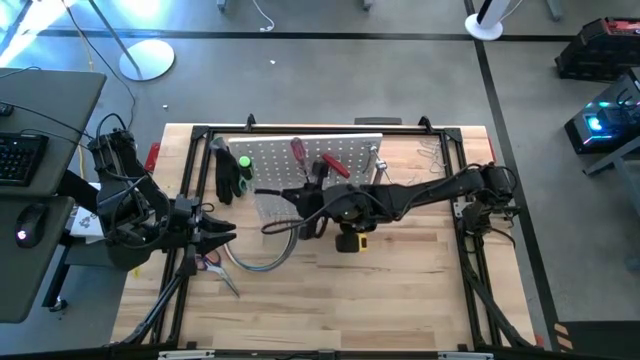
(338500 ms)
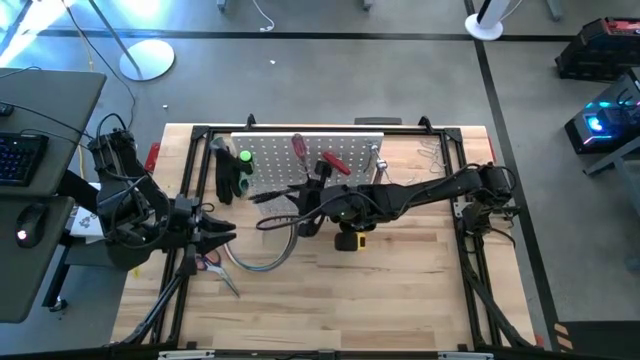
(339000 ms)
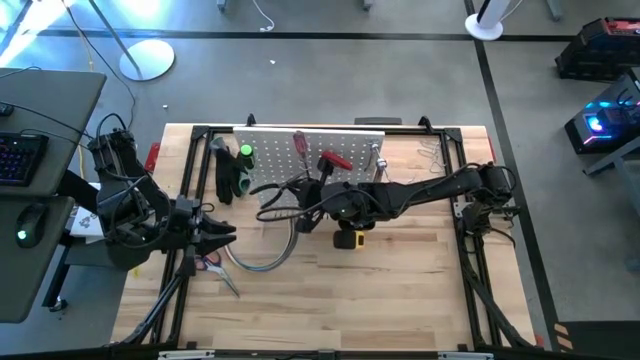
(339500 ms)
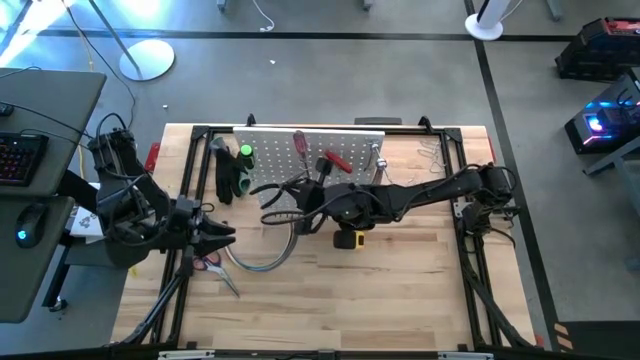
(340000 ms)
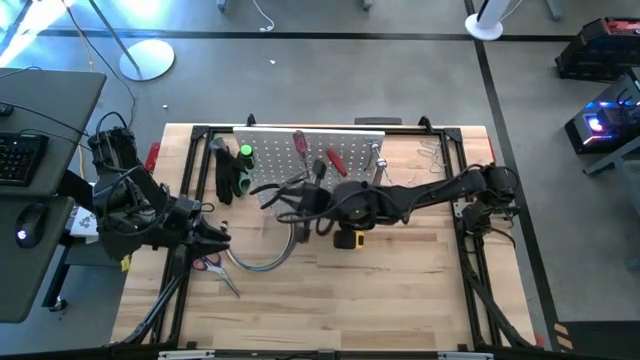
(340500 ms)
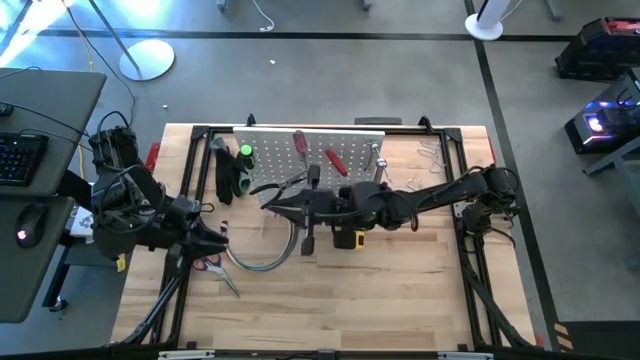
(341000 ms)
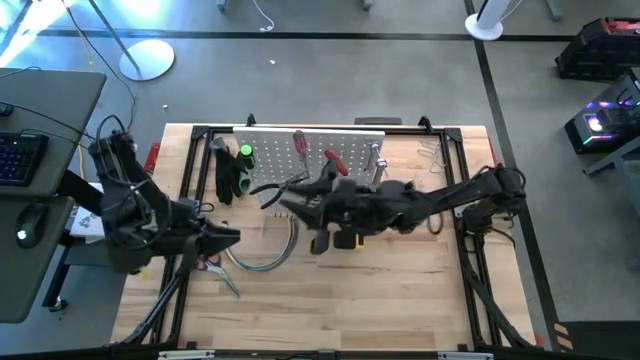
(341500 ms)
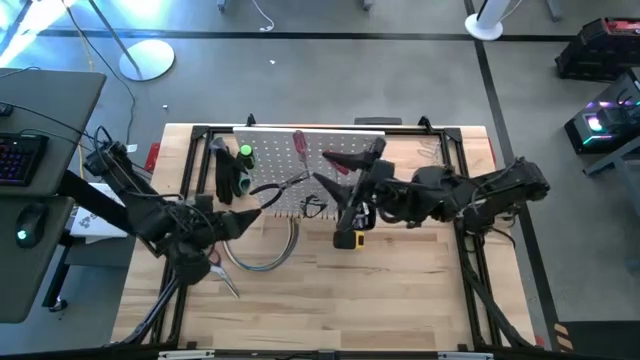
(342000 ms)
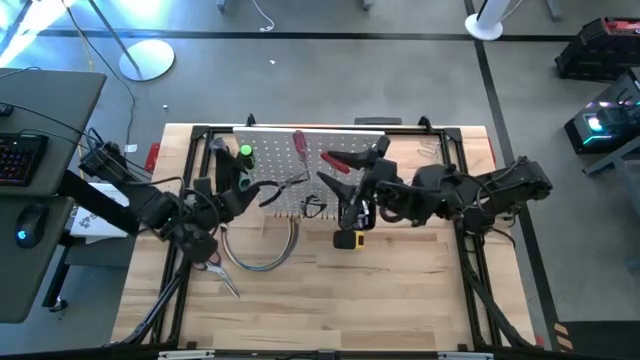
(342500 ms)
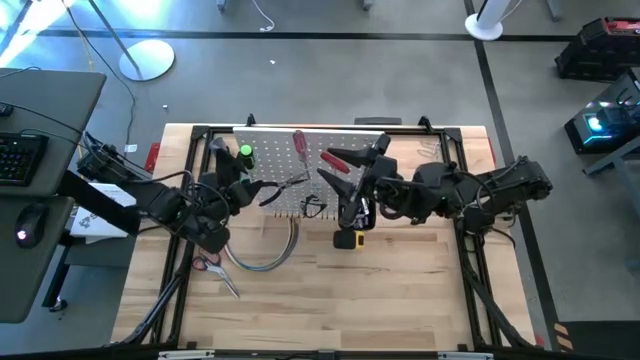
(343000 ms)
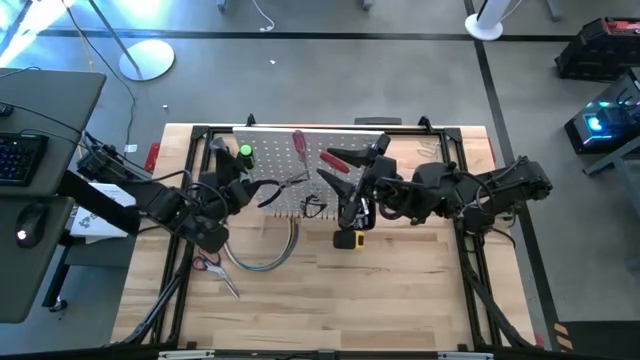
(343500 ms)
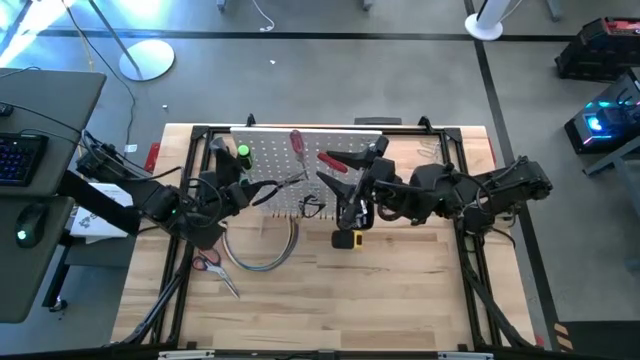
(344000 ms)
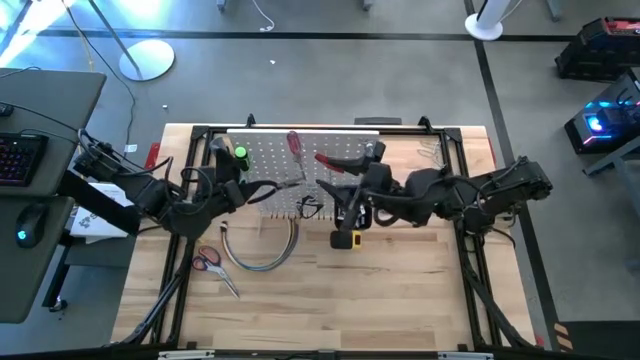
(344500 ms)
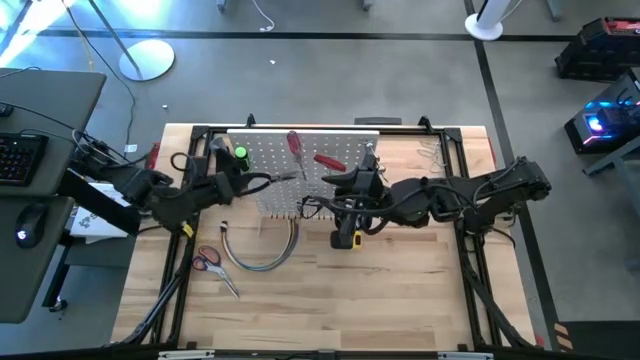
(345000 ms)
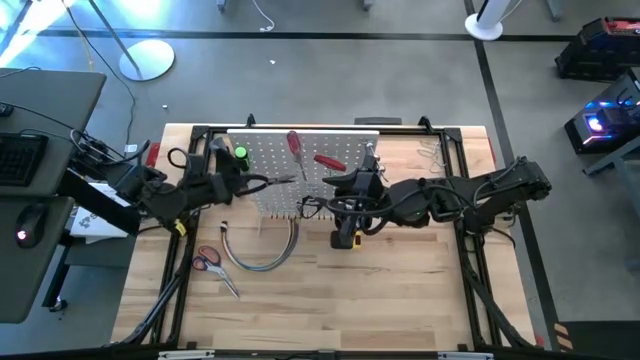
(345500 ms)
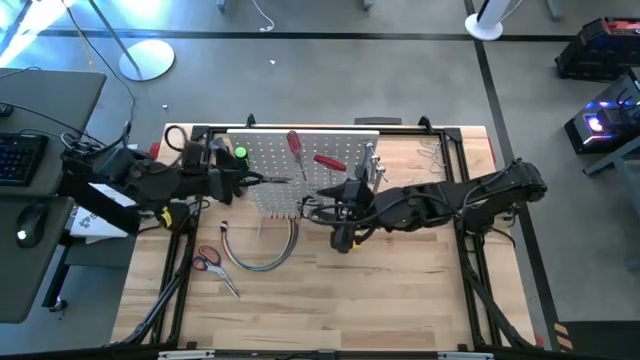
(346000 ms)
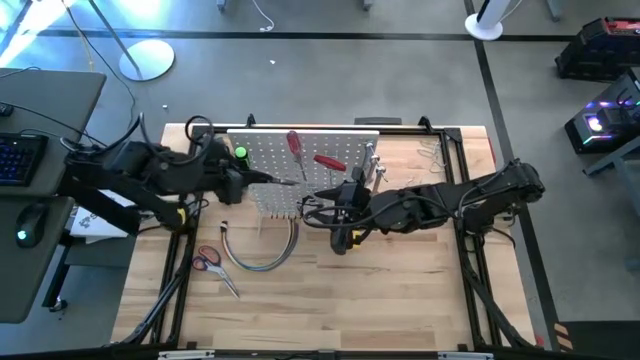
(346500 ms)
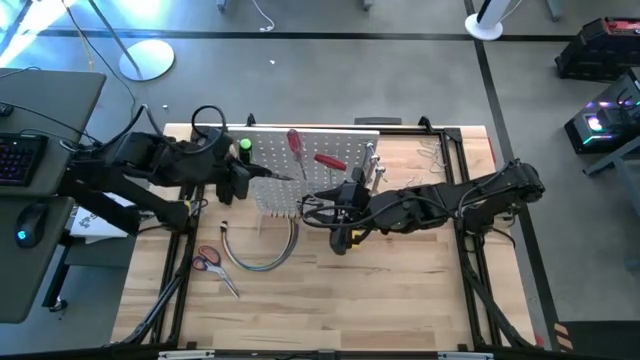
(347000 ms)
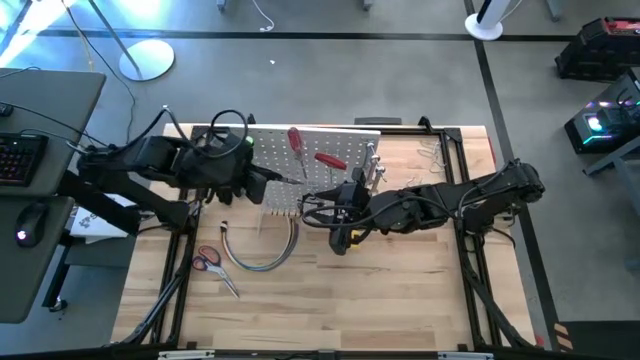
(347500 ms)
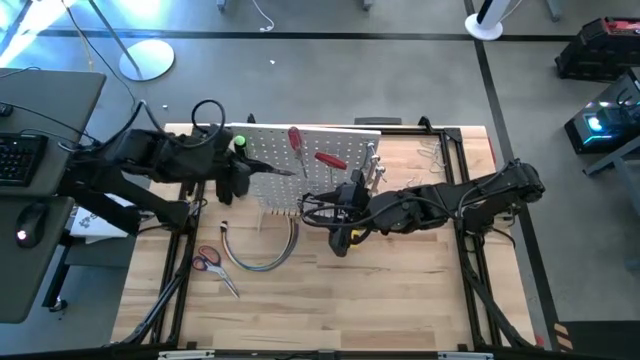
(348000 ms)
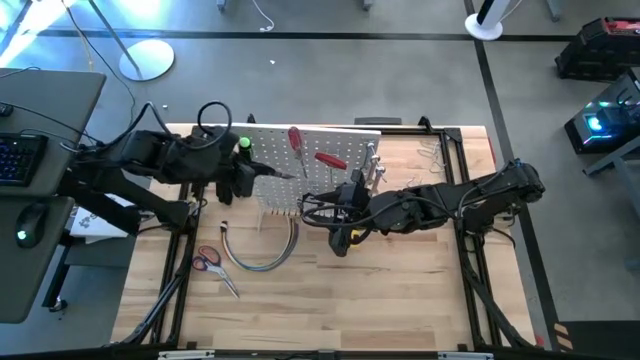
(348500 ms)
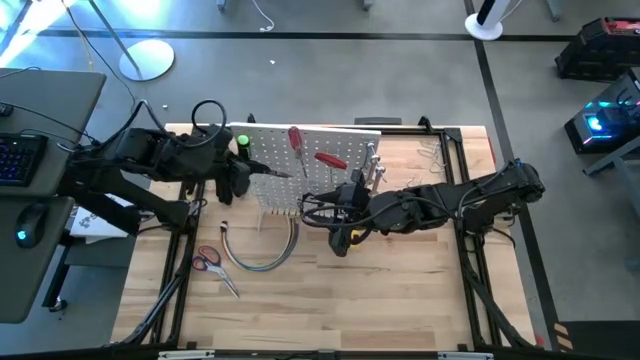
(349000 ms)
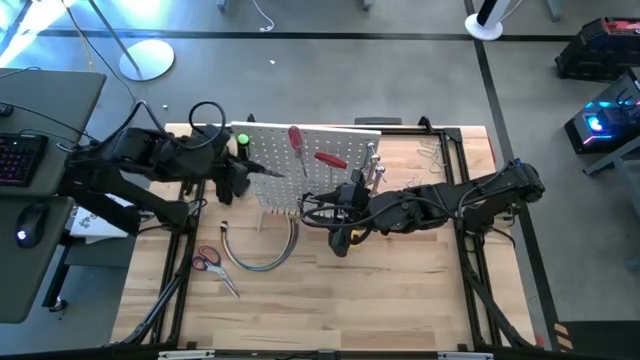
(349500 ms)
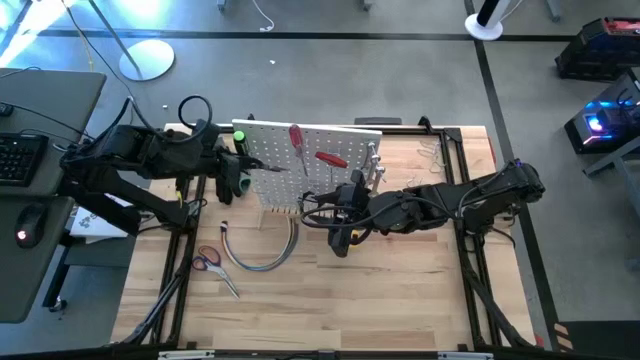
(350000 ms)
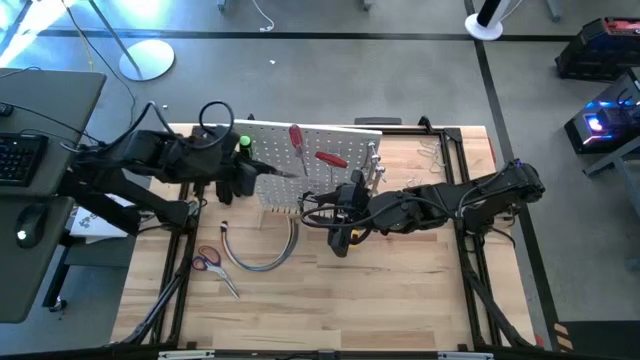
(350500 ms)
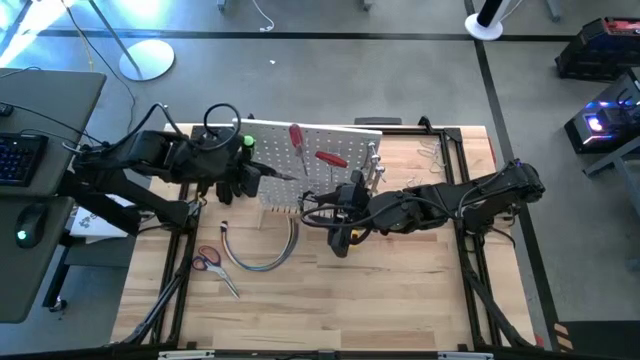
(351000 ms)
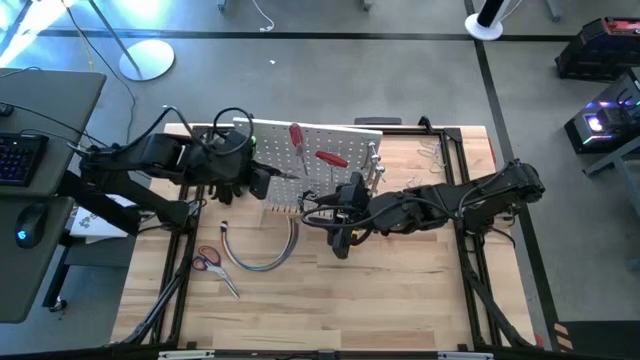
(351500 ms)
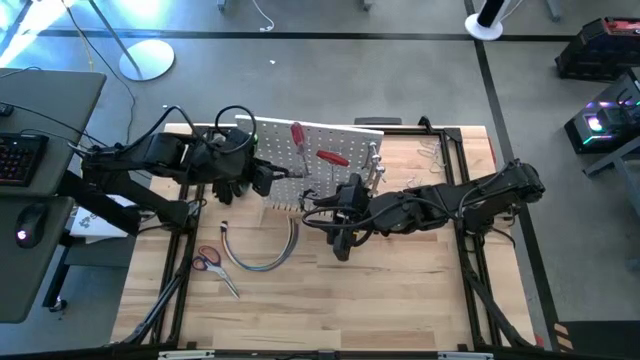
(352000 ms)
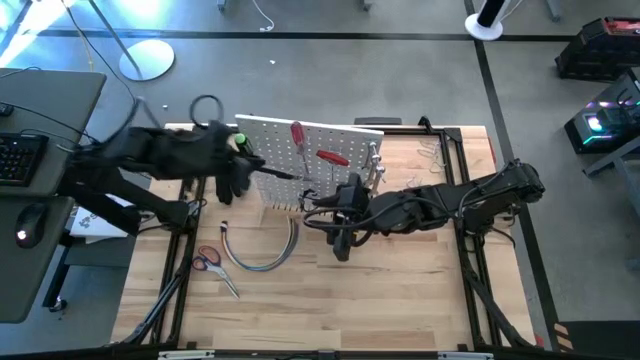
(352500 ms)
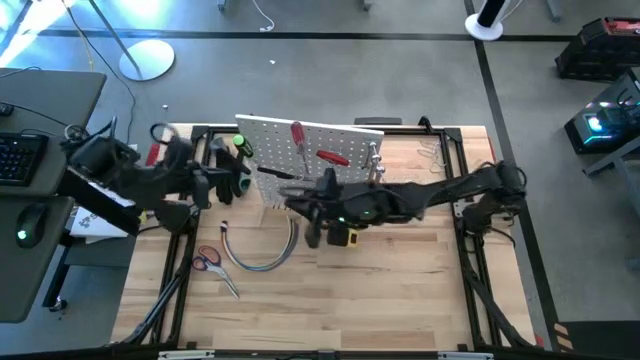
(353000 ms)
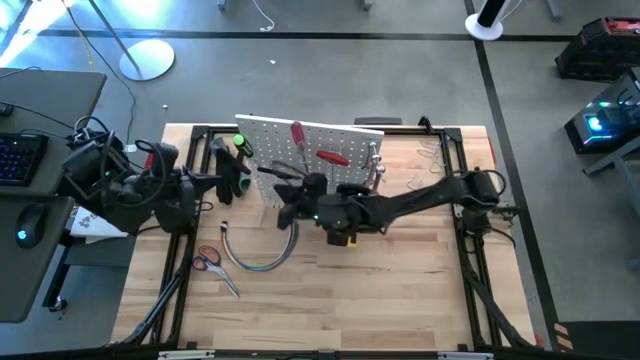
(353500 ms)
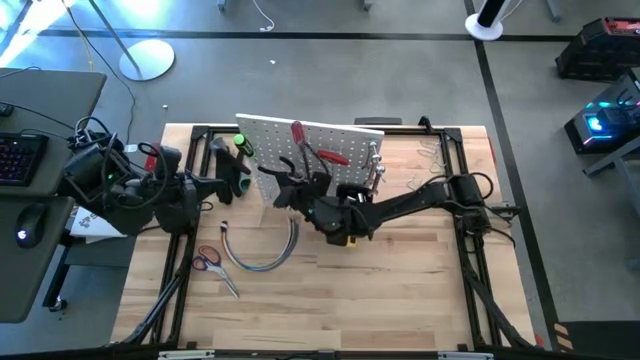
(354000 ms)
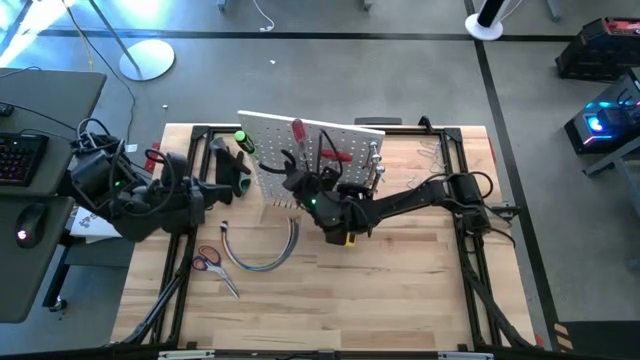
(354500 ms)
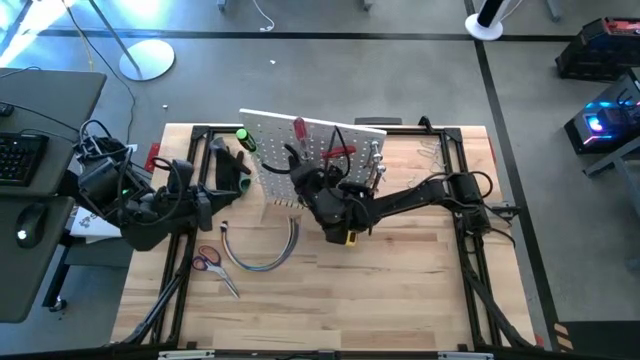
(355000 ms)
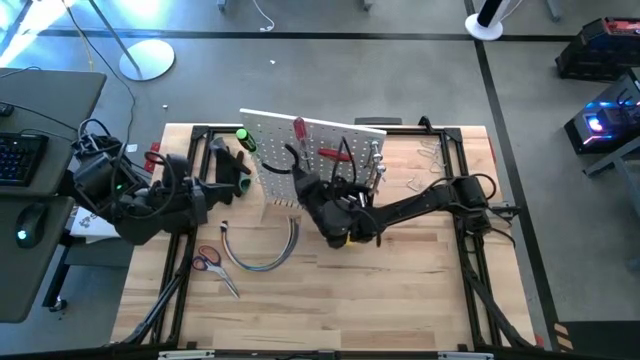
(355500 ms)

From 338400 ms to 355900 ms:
Task: Hang tools onto peg board
Hang the plier on the peg board

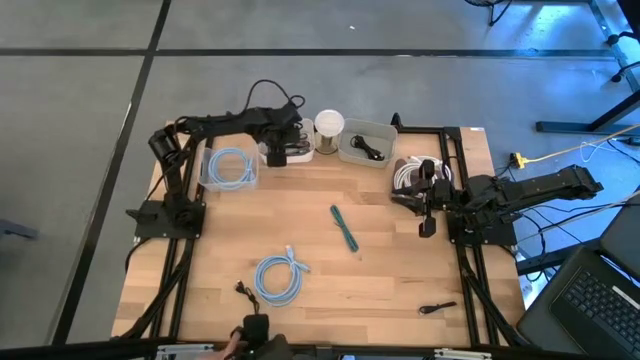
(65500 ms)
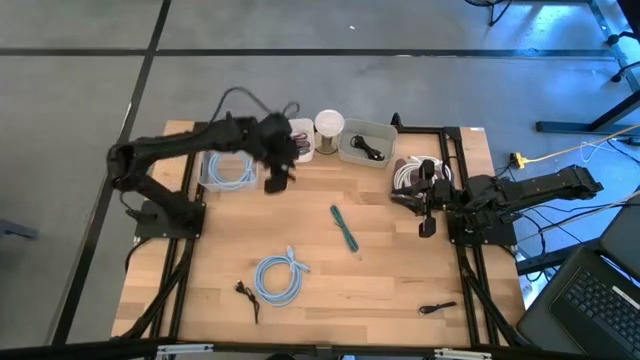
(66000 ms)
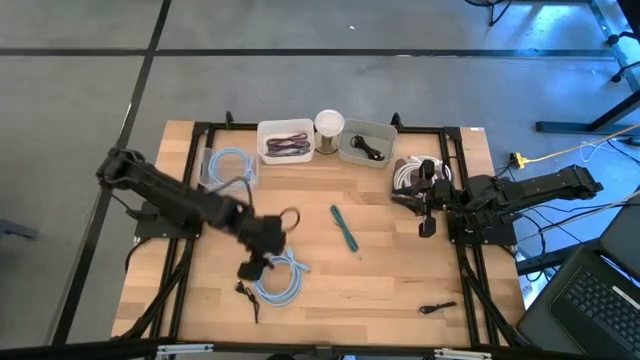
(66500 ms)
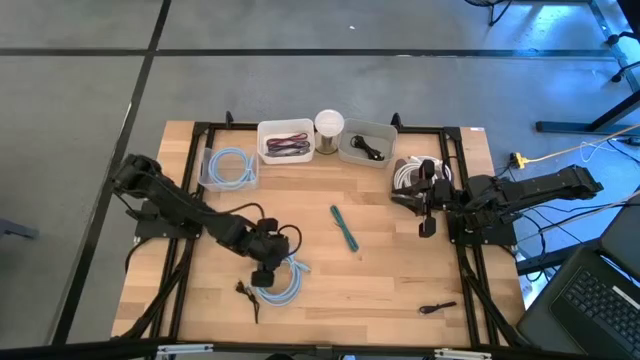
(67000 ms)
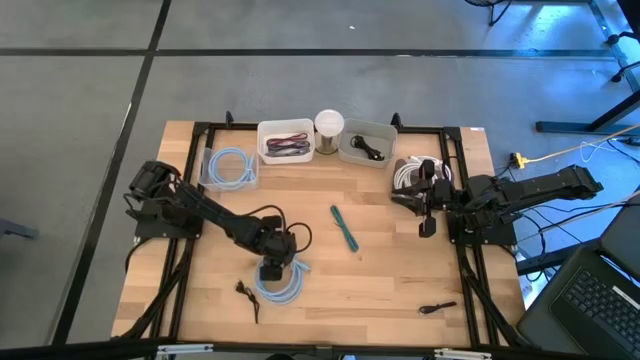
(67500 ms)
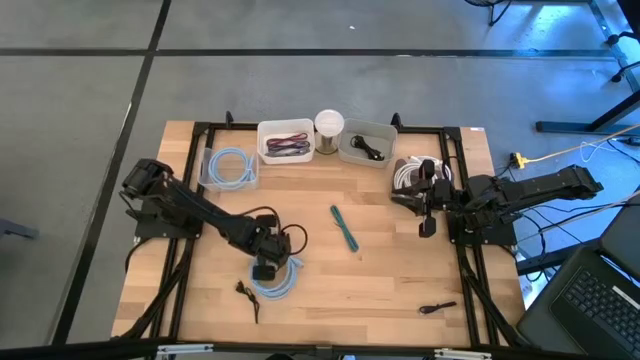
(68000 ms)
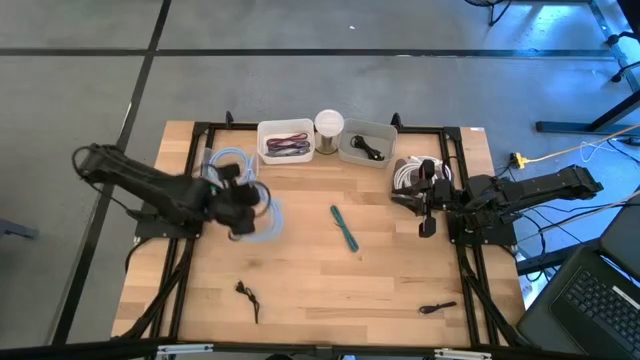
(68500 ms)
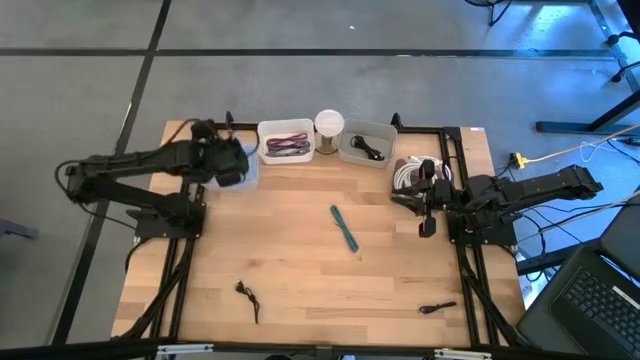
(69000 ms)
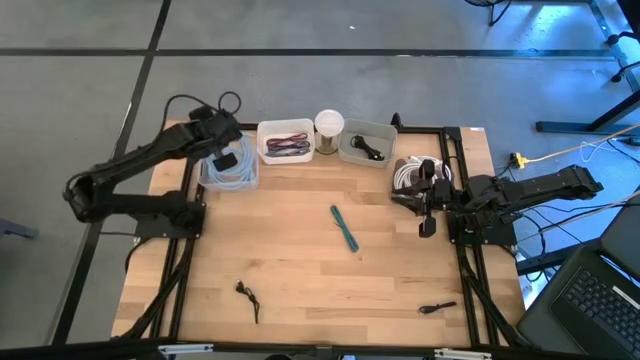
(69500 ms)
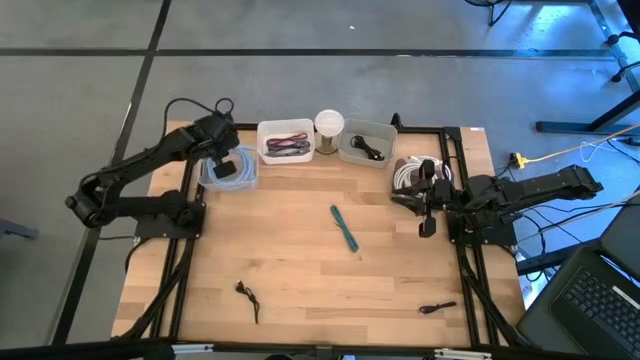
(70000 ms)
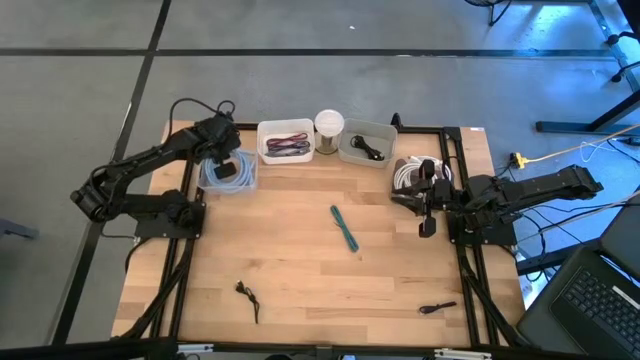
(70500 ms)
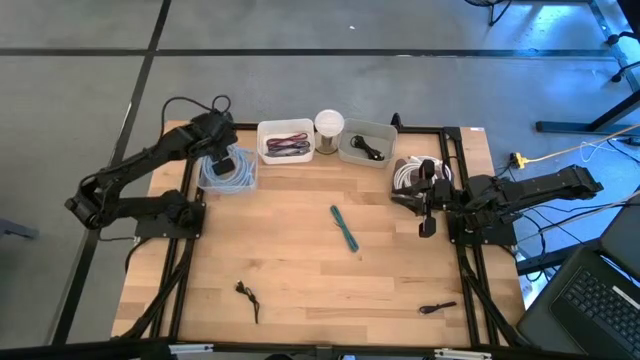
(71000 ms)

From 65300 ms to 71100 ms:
Task: Pick & Place USB Port
Put the blue HDMI cable into the transparent bin
